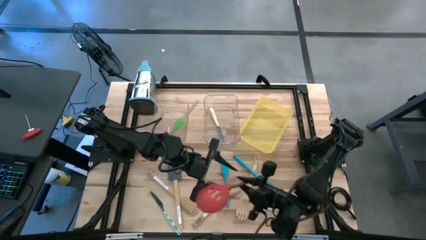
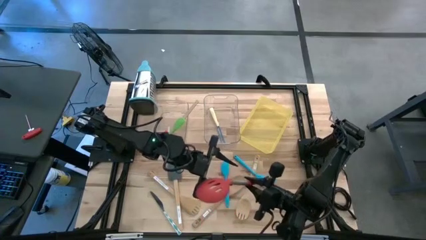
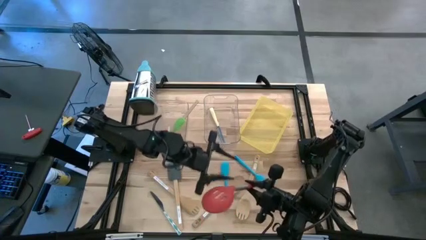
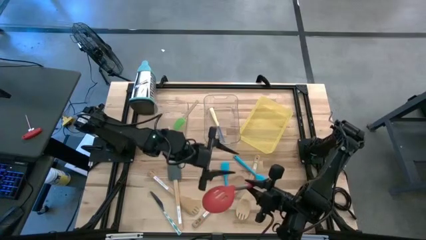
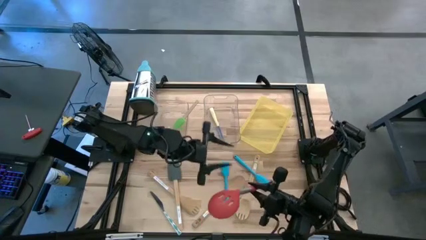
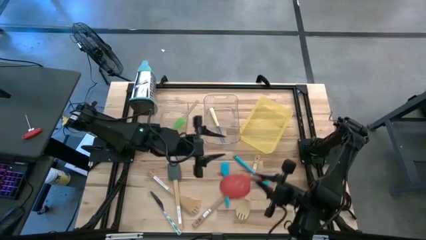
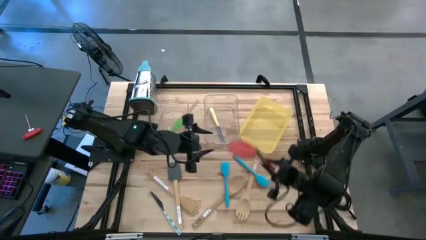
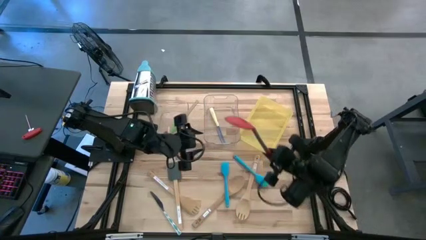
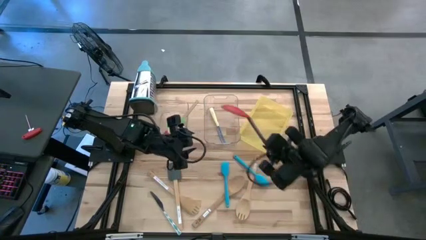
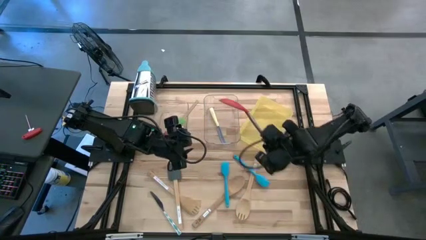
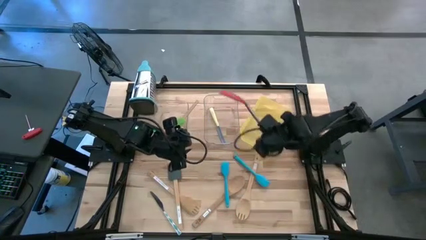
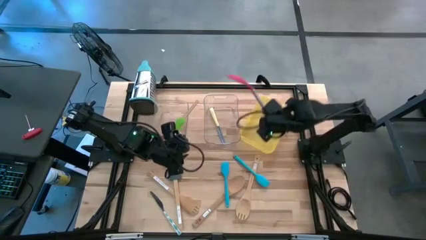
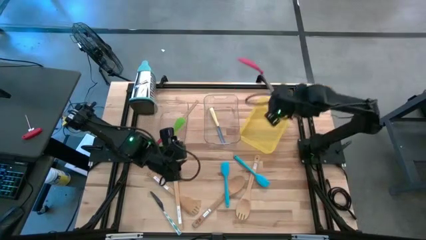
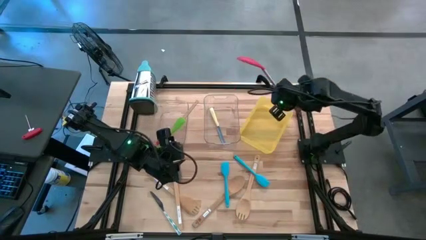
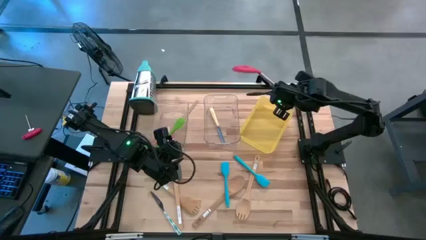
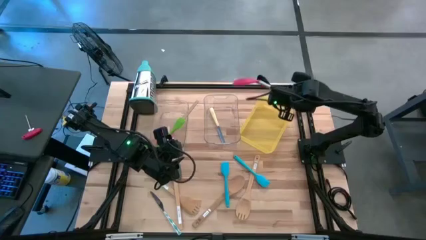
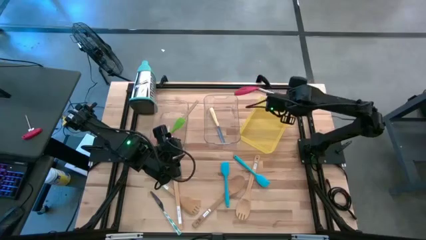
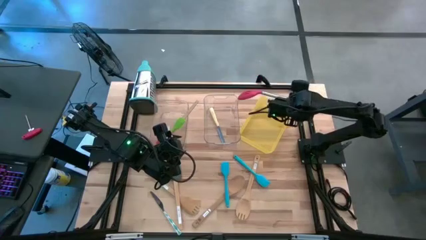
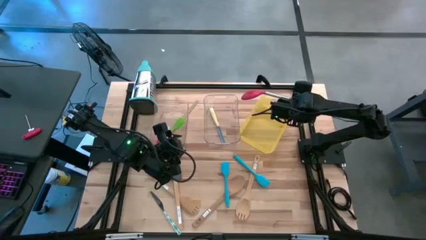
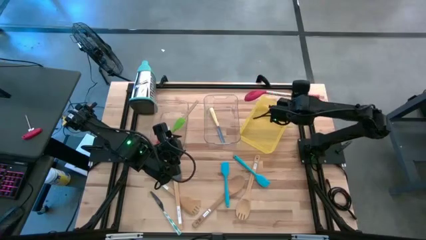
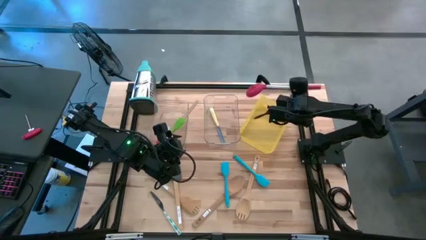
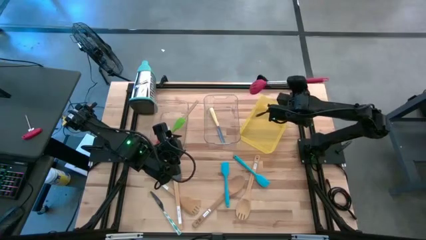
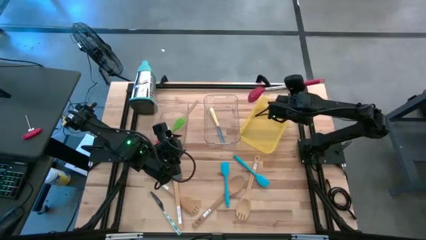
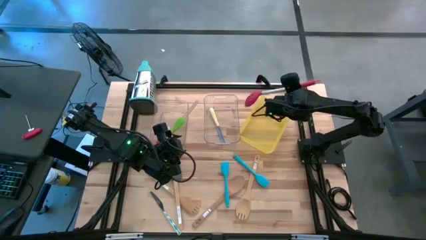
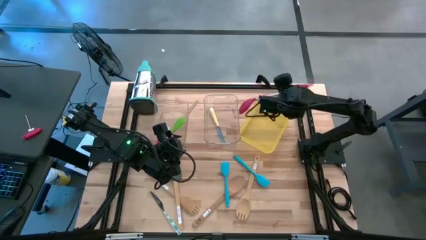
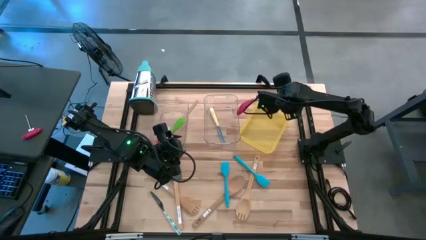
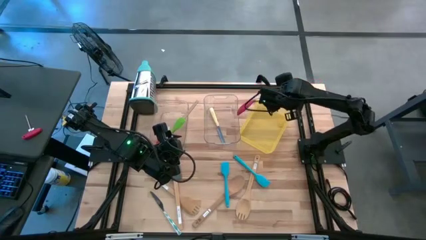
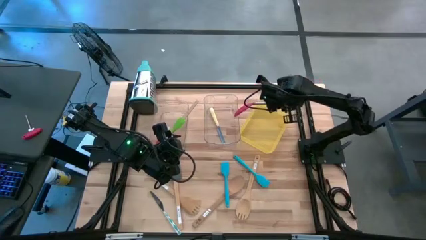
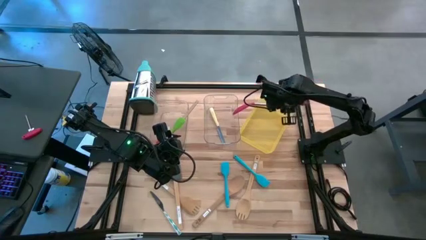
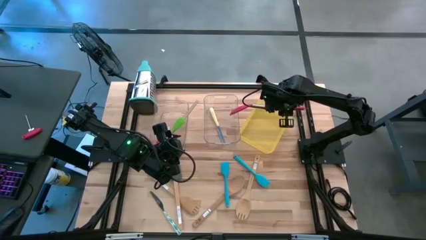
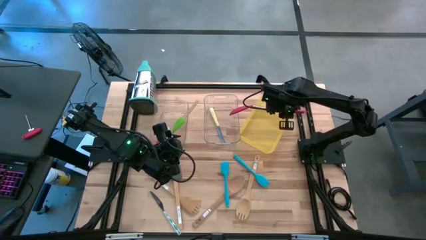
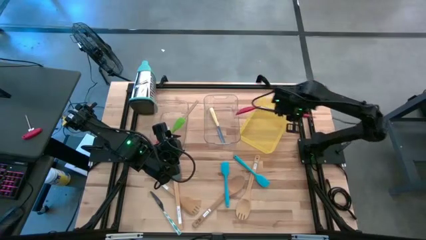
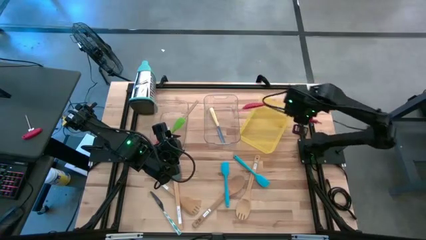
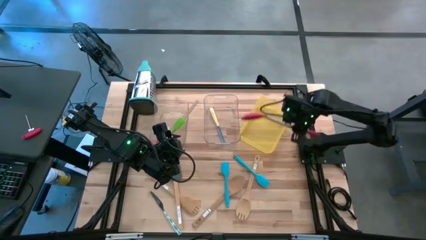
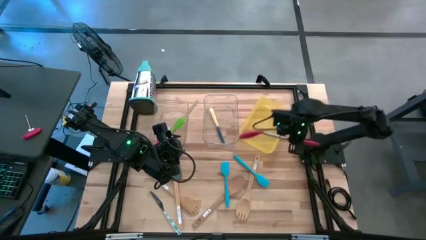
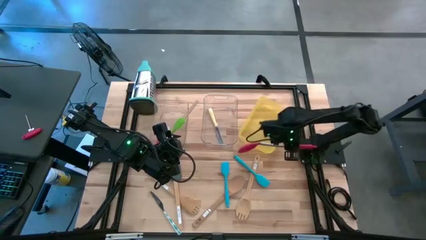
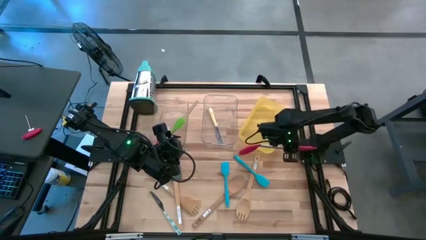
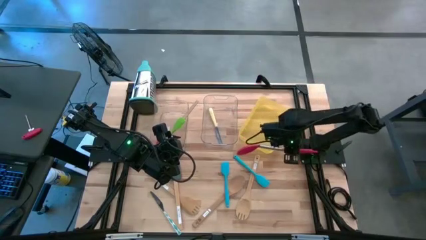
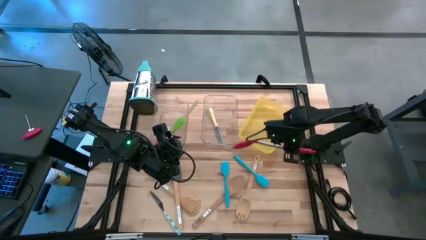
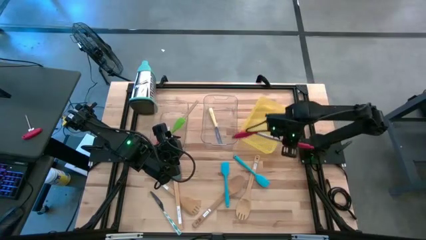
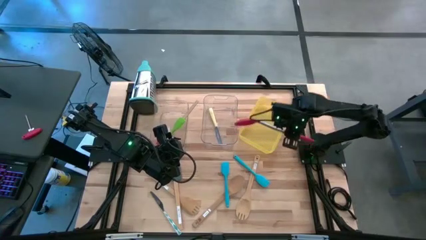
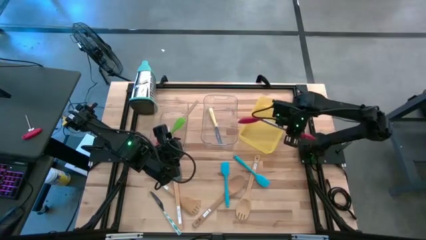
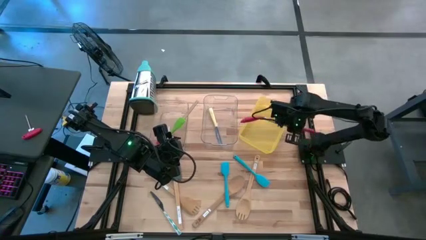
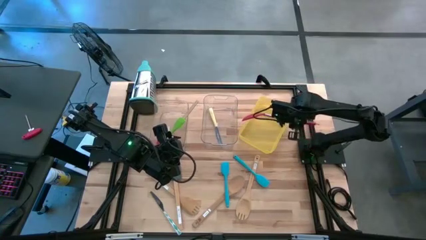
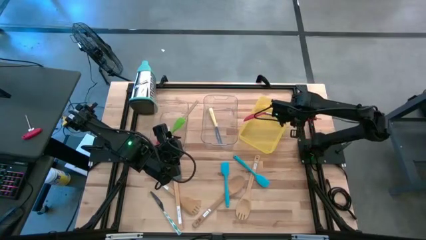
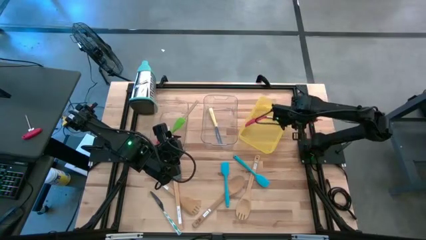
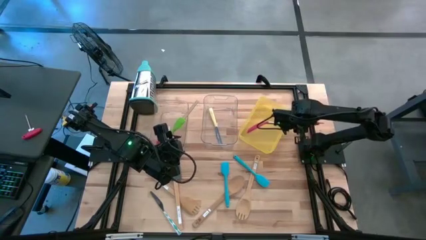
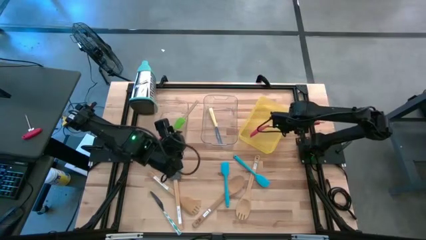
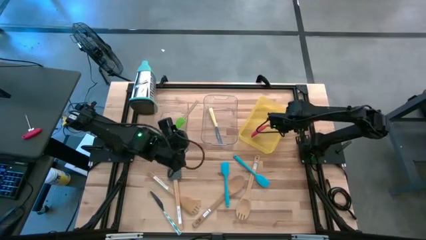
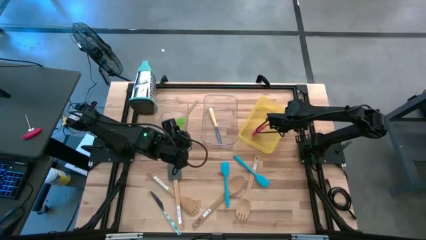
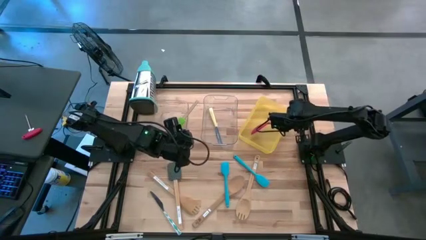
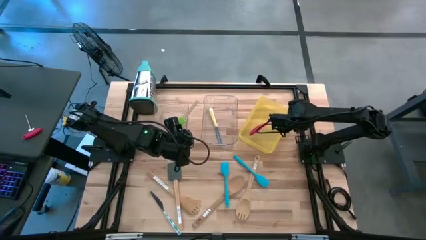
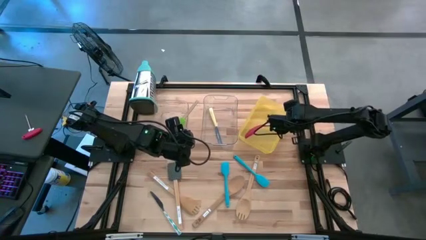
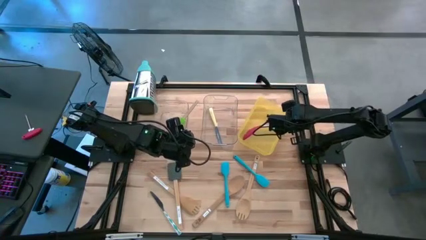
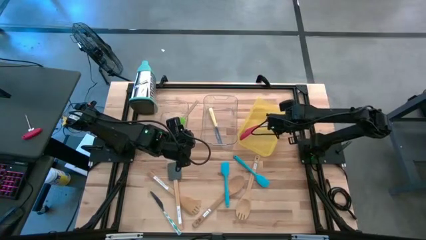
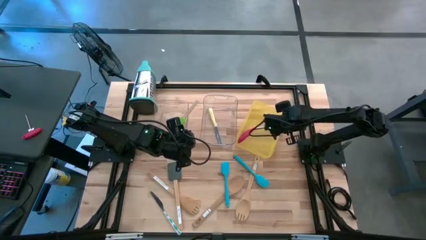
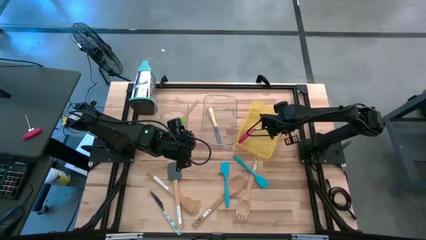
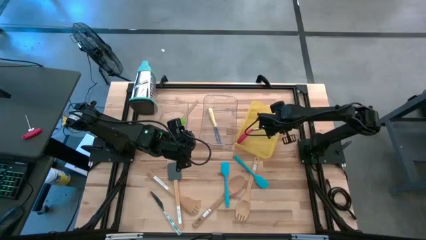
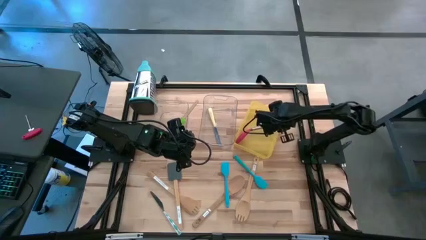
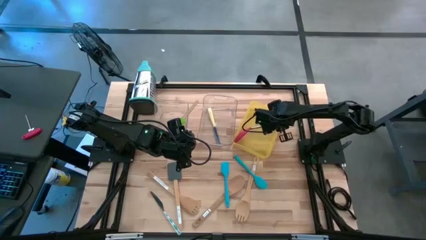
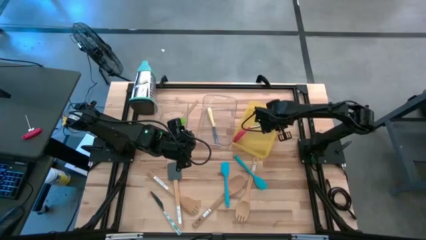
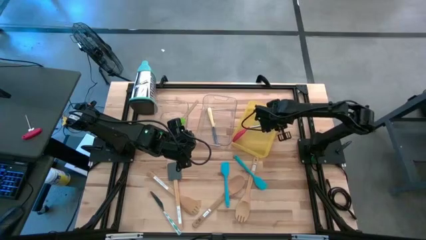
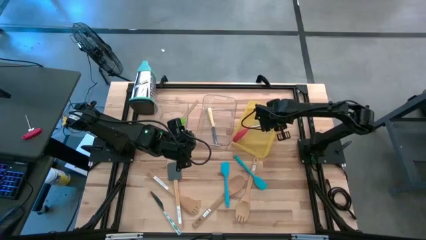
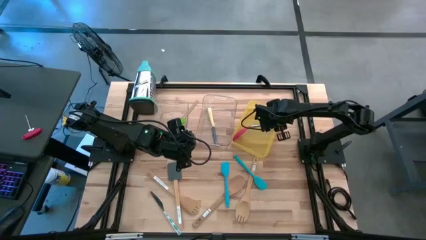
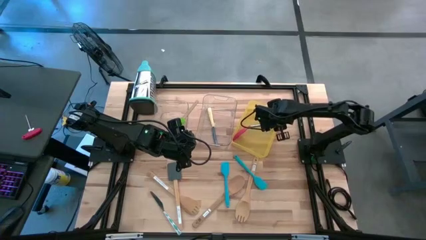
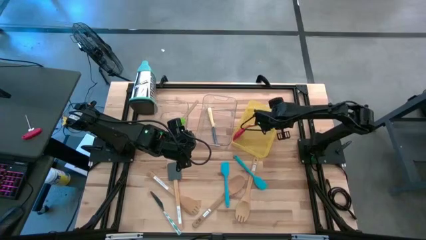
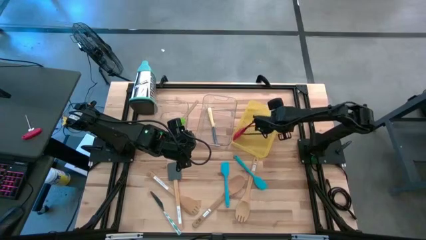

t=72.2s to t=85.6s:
Task: Pick & Place Kitchen Items
Put the red slotted spoon into the yellow bin
